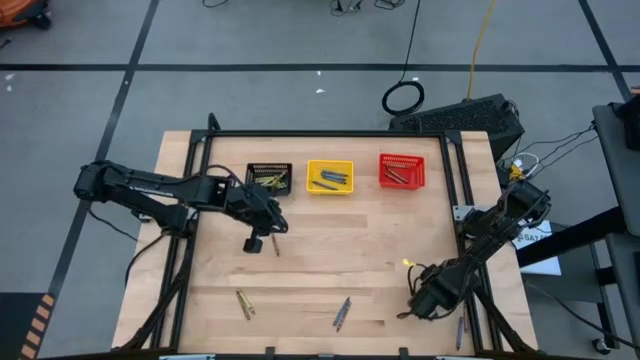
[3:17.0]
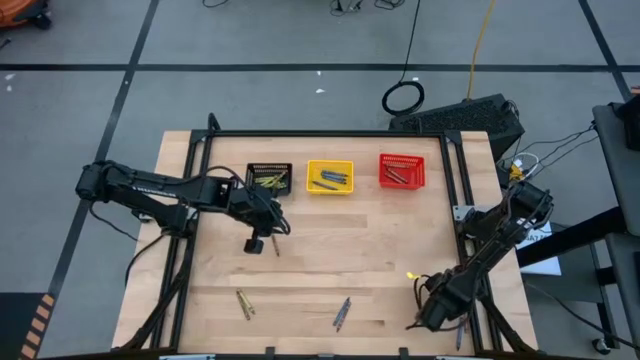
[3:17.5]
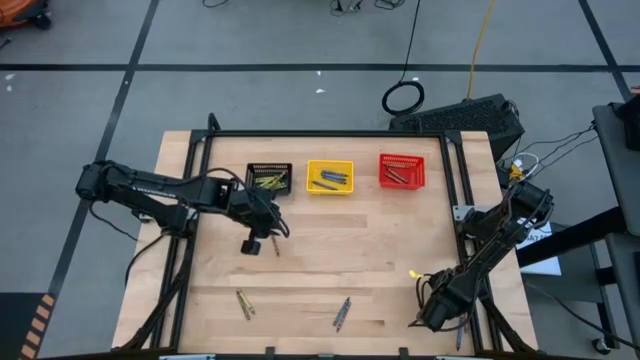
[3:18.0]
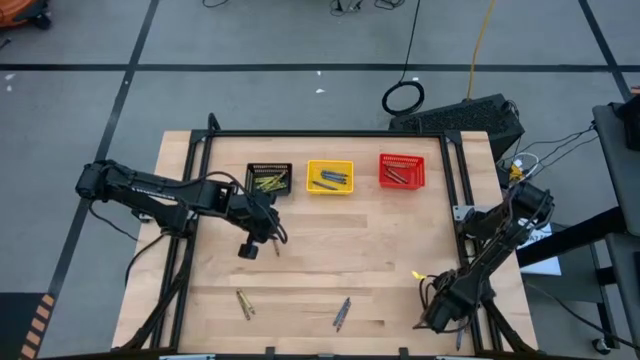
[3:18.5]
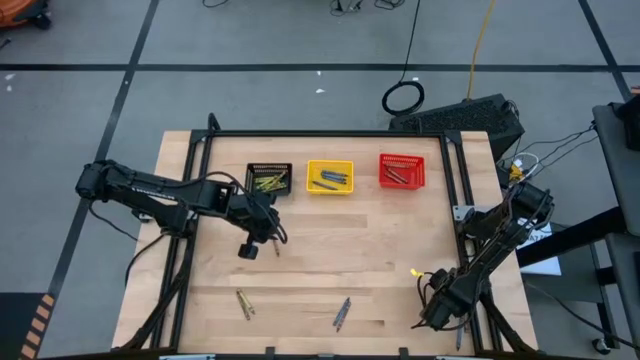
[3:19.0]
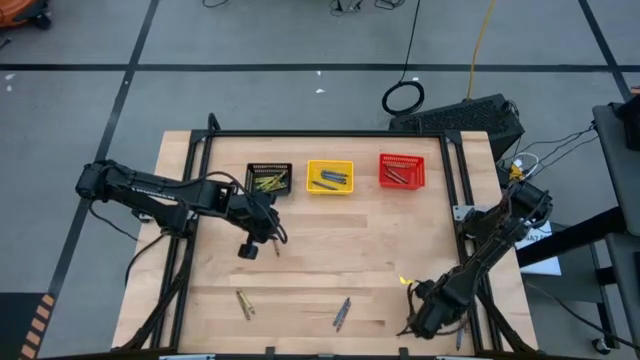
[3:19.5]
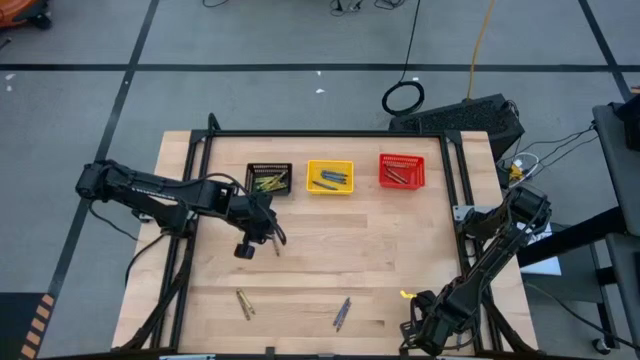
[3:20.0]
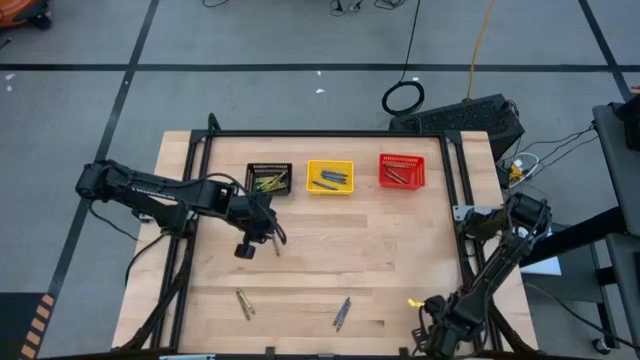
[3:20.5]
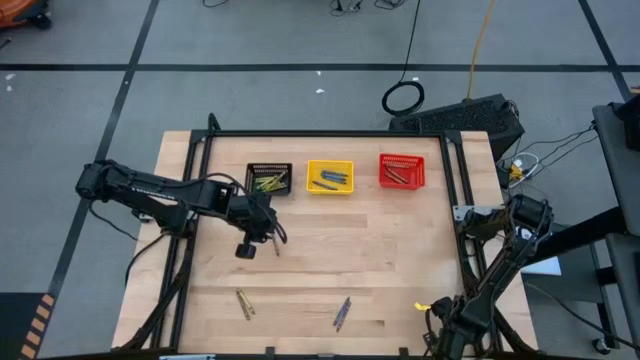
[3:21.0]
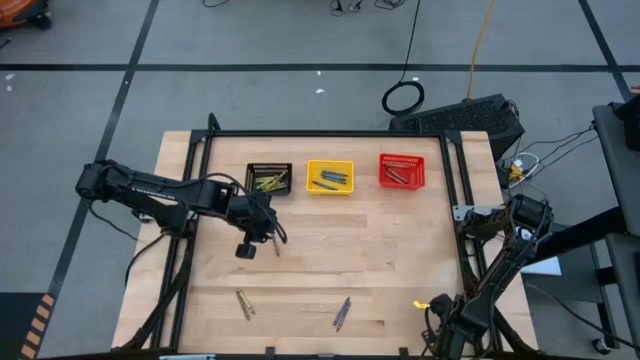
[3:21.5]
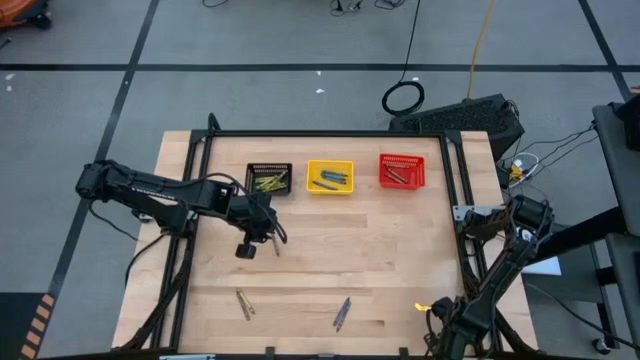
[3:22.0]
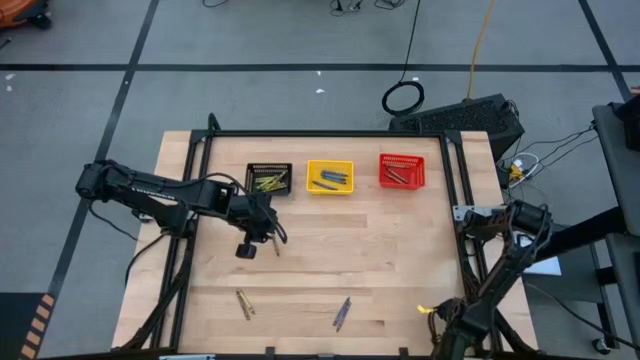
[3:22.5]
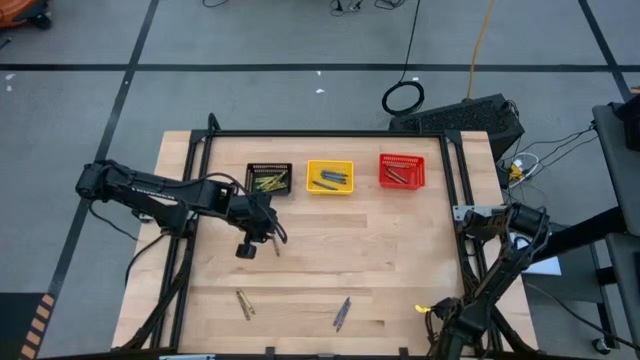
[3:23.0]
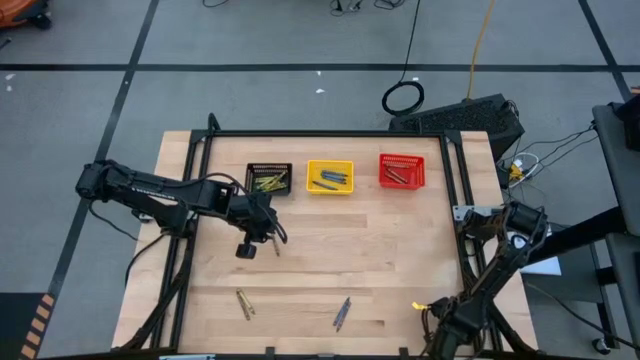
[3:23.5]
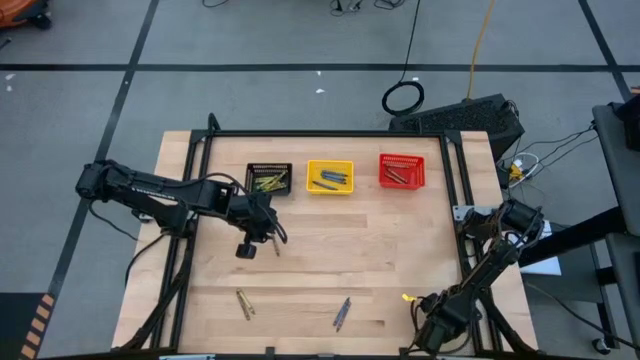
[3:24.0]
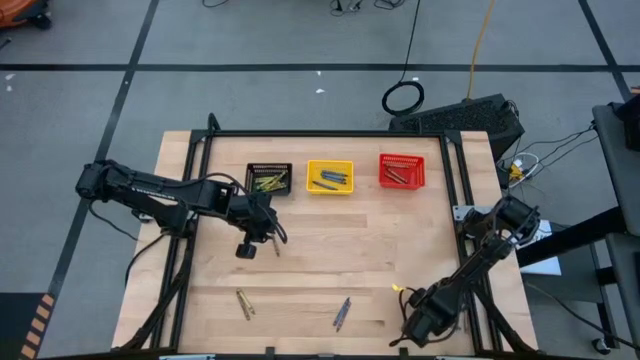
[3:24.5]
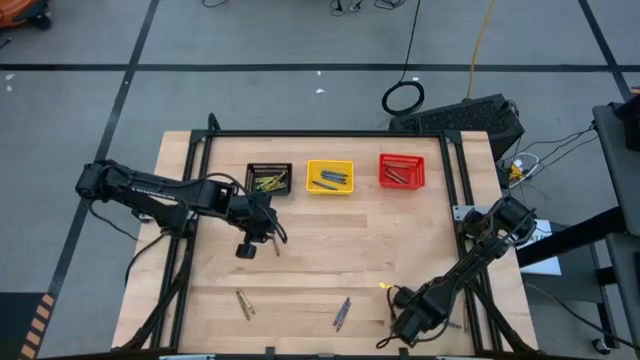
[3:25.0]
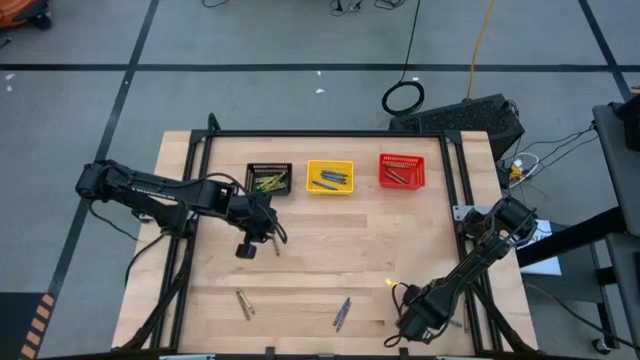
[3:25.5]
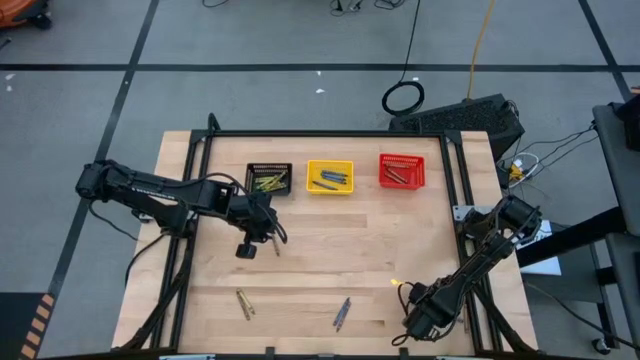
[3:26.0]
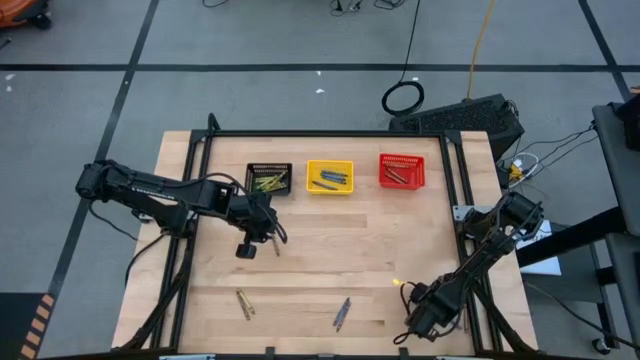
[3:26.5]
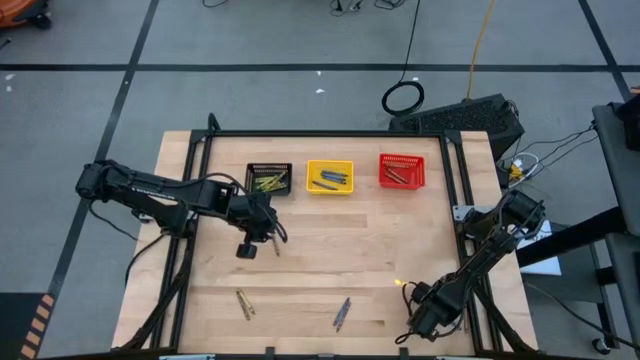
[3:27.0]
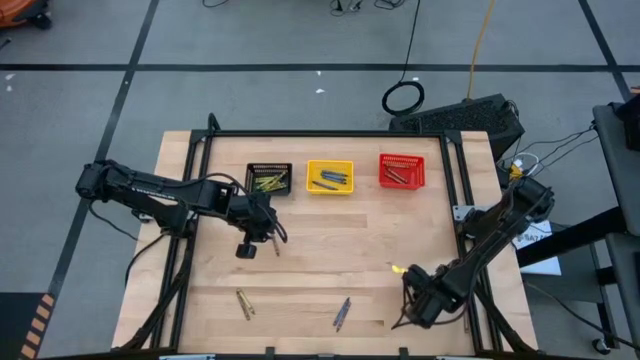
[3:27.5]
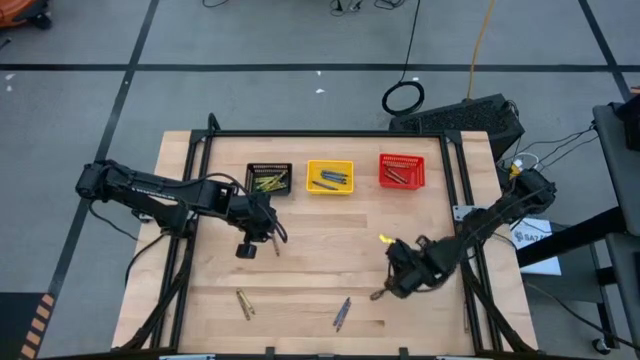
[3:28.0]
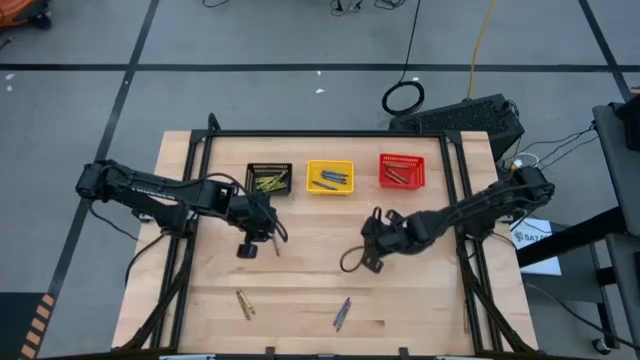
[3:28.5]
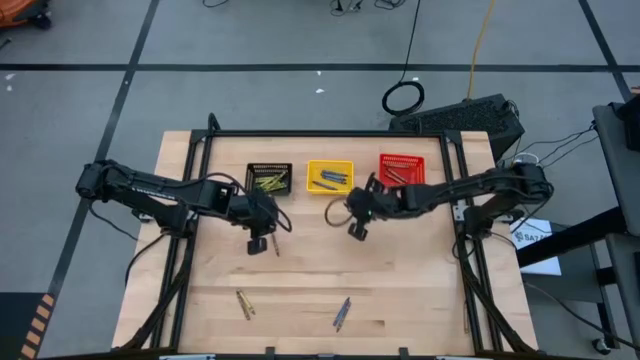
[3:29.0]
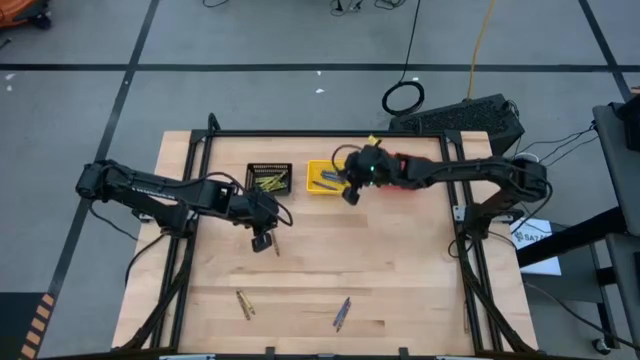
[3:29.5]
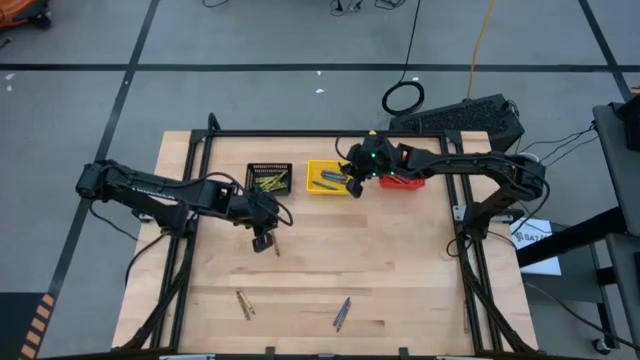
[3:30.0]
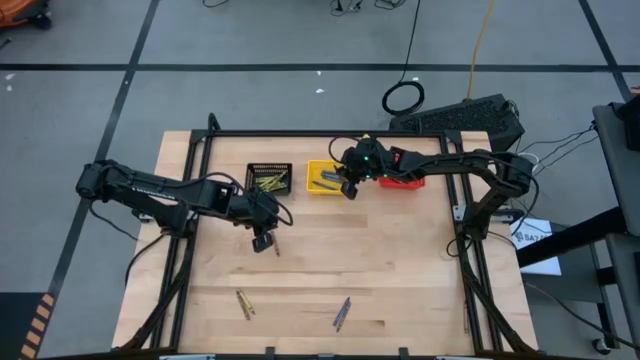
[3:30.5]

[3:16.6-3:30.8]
Task: Sort crayons
Put the blue crayon into the yellow bin

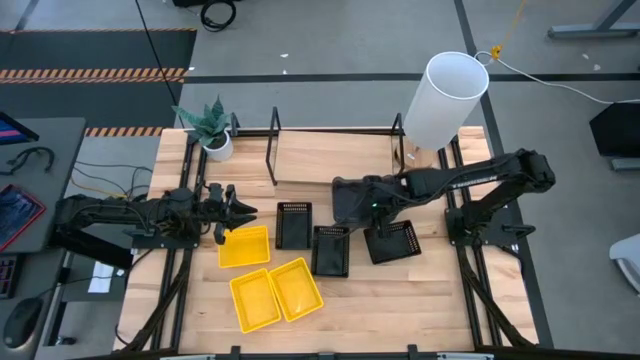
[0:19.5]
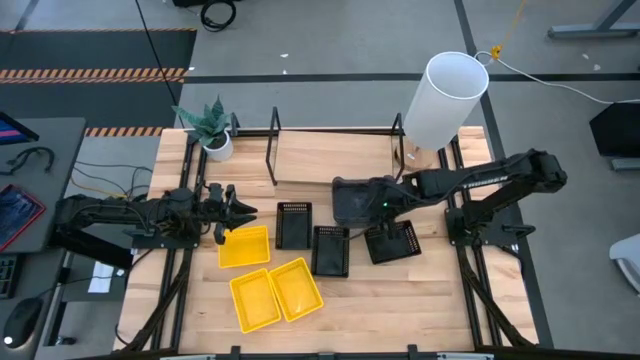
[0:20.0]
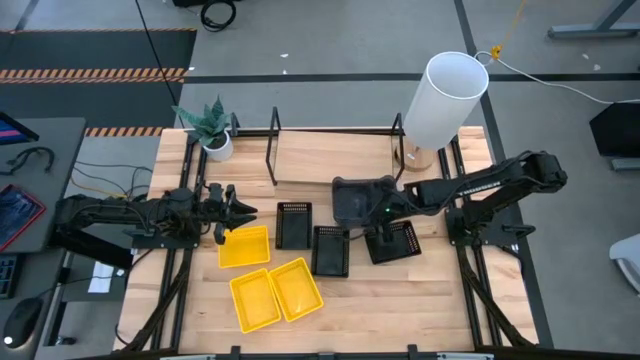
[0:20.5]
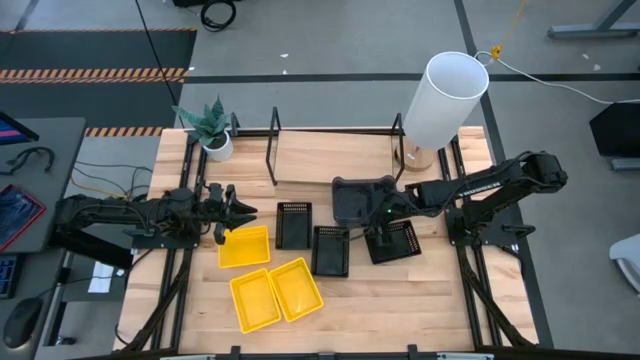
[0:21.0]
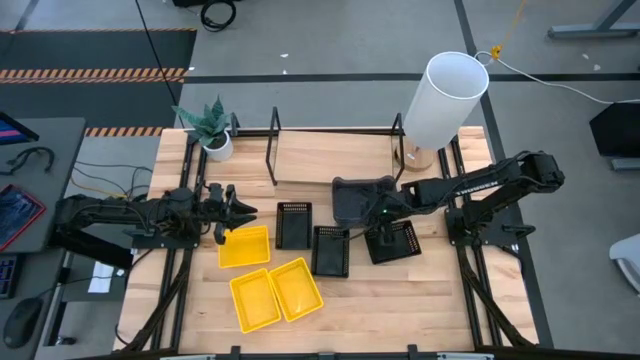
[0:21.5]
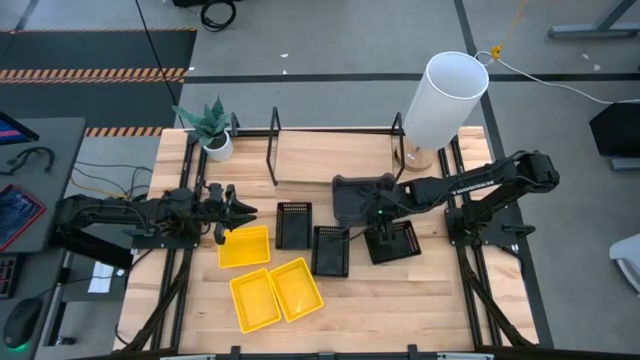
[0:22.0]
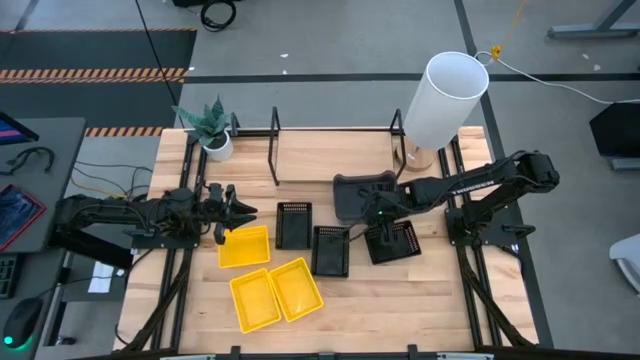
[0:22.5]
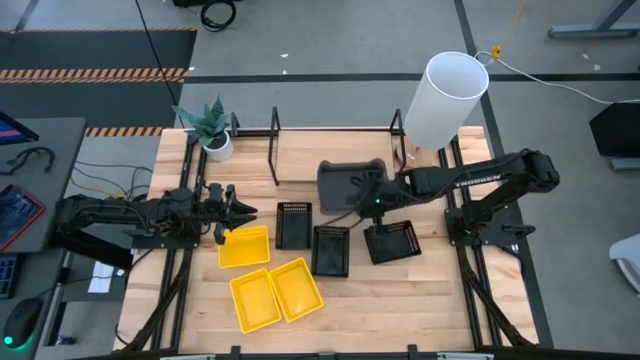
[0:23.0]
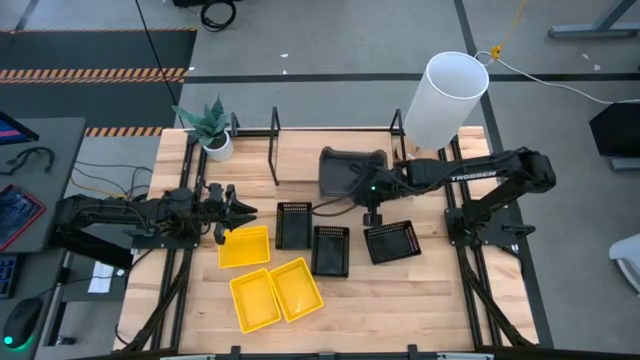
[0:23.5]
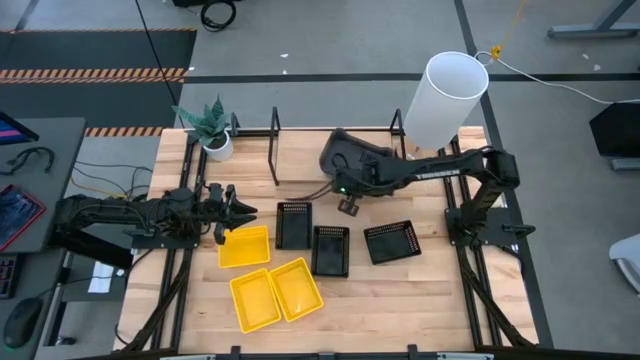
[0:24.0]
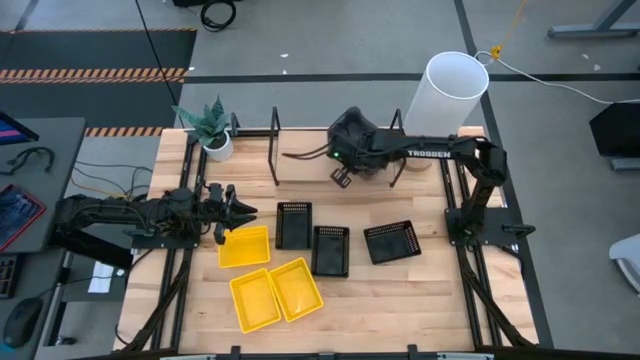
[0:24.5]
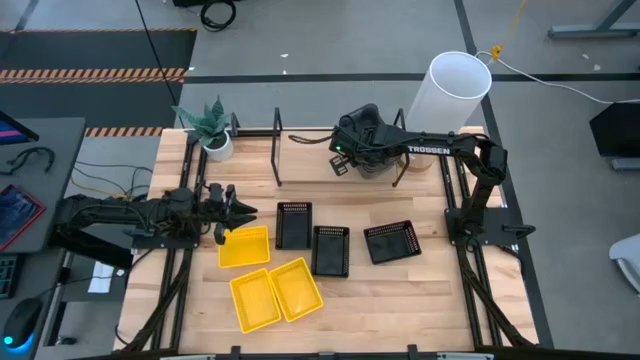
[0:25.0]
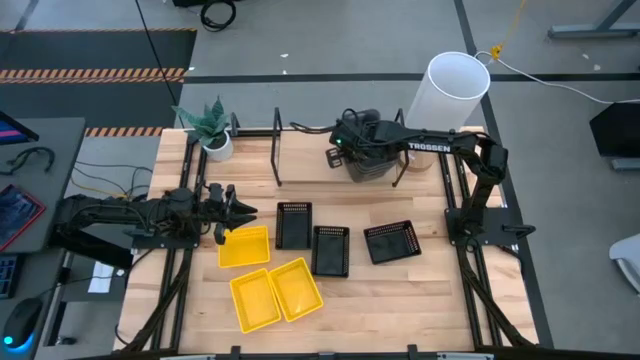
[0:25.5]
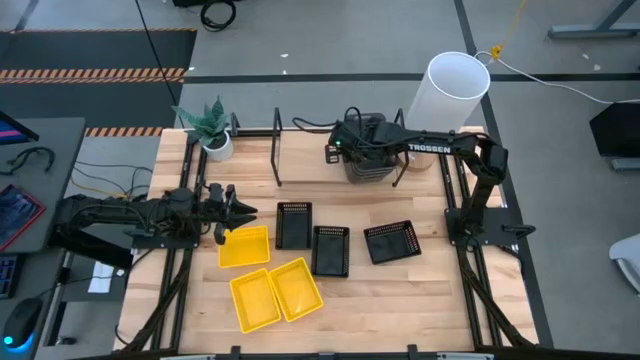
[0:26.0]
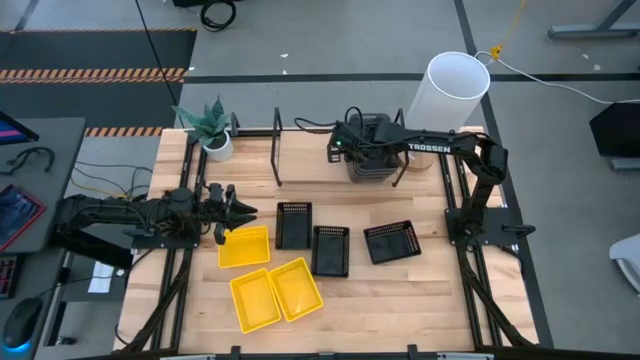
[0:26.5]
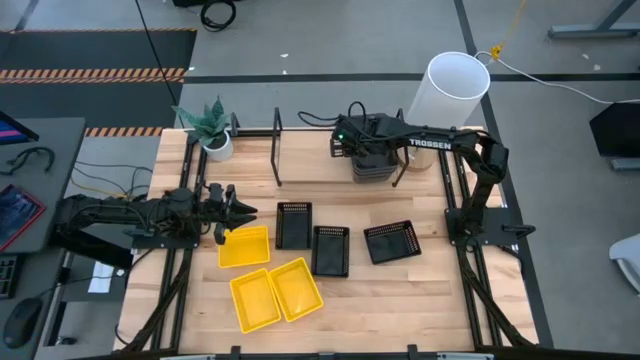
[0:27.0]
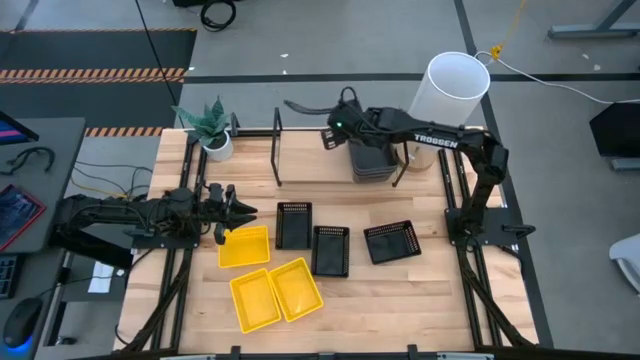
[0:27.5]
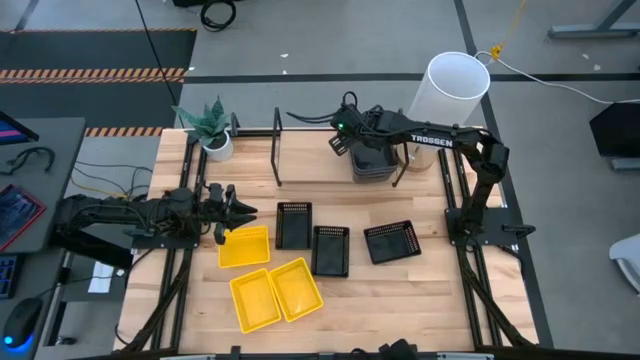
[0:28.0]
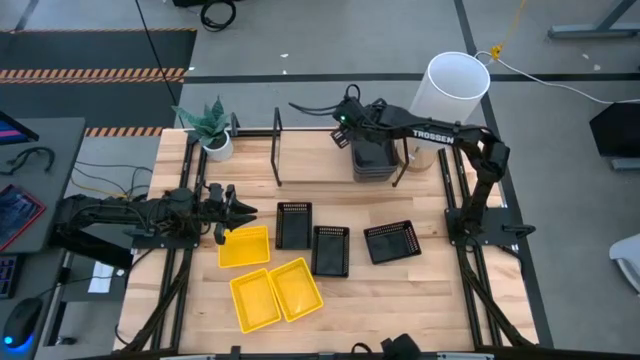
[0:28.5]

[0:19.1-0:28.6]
Task: Stack baskets on shelf by color
Put the stacked gray bins on the shelf
